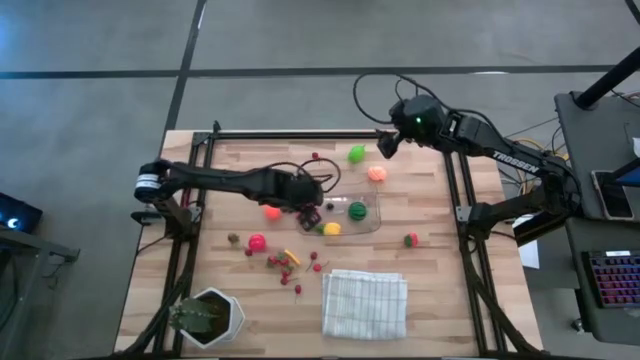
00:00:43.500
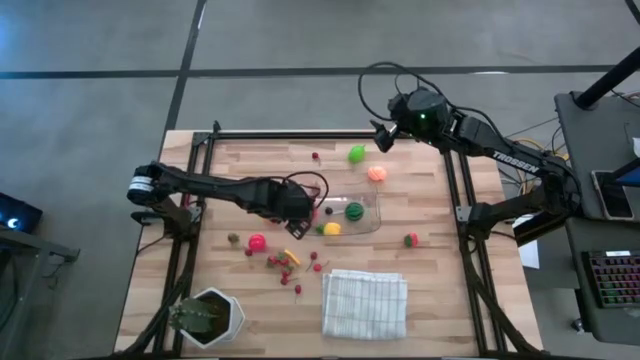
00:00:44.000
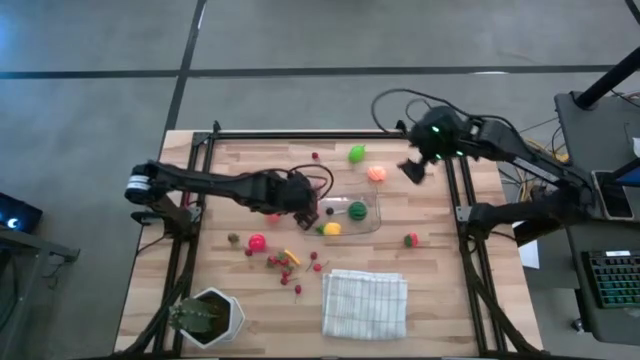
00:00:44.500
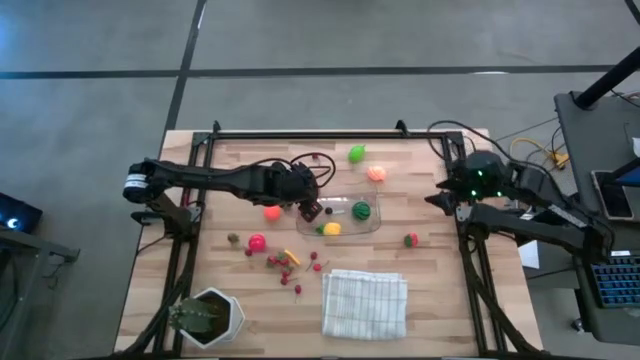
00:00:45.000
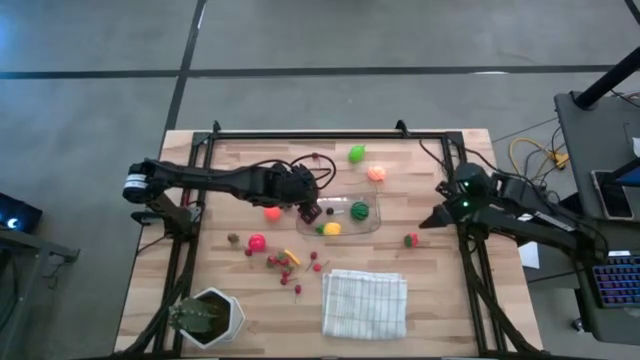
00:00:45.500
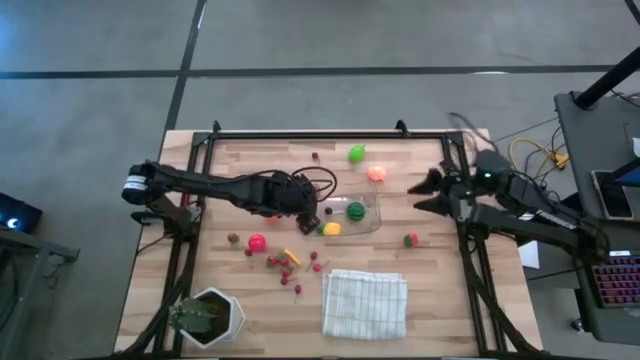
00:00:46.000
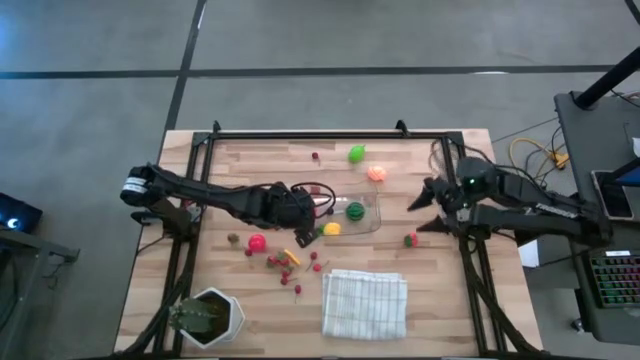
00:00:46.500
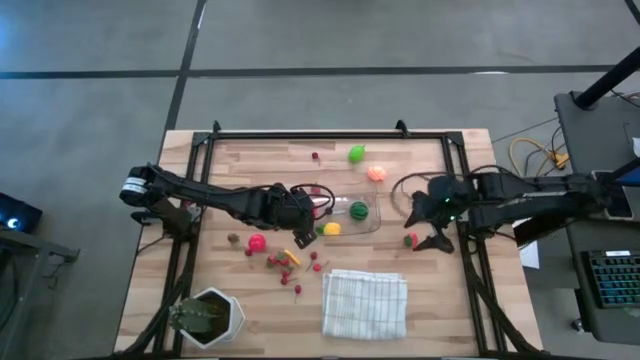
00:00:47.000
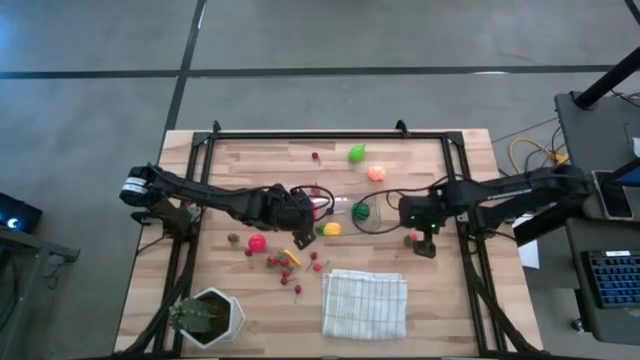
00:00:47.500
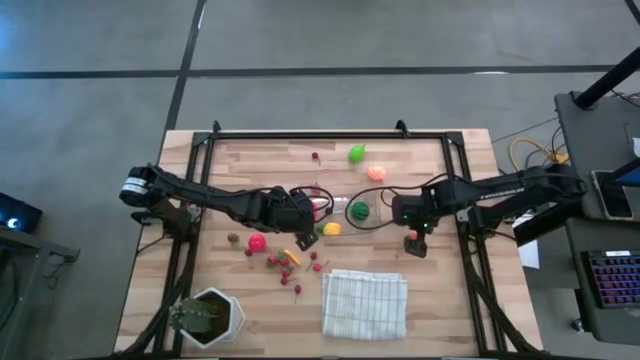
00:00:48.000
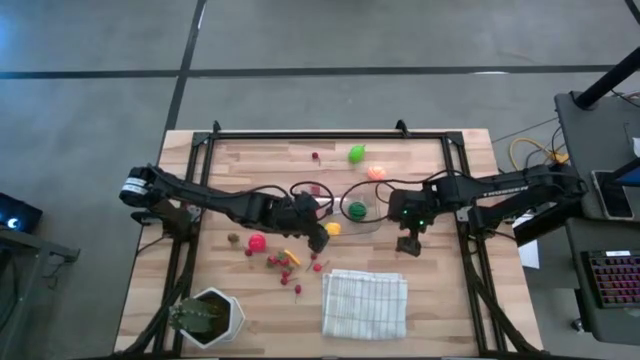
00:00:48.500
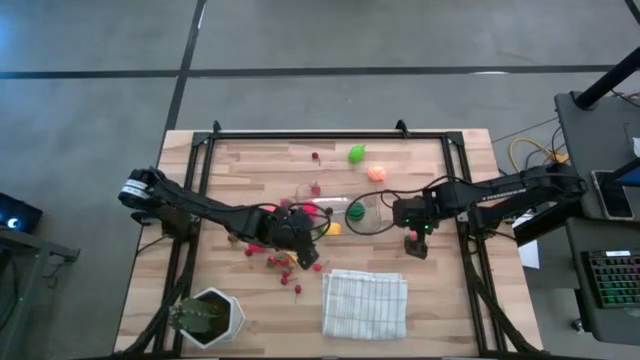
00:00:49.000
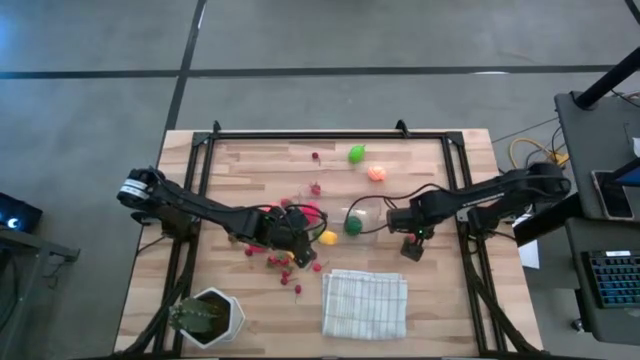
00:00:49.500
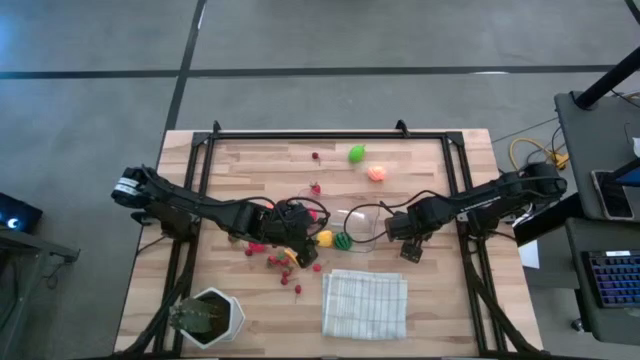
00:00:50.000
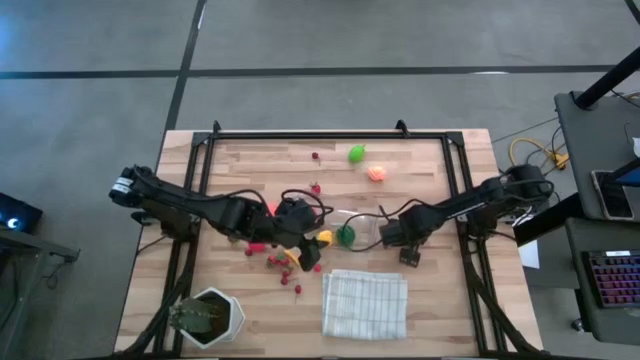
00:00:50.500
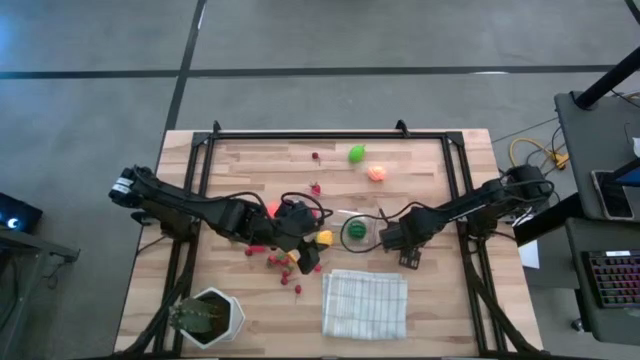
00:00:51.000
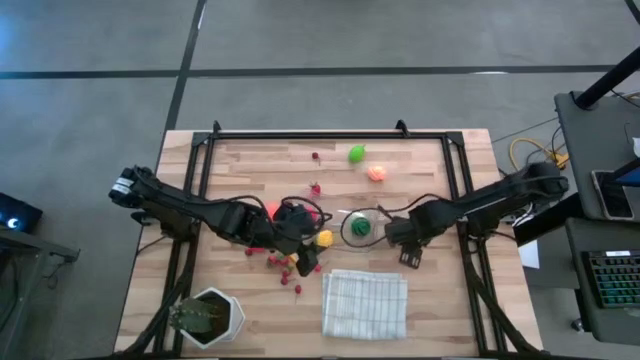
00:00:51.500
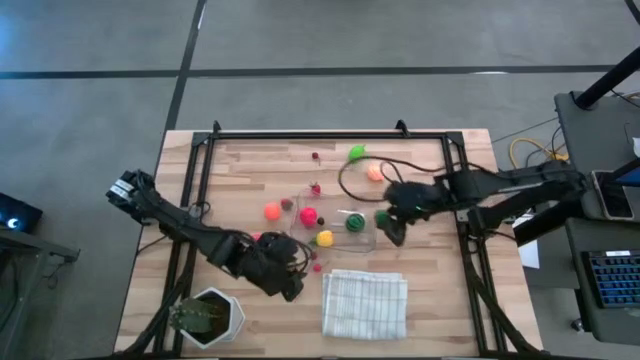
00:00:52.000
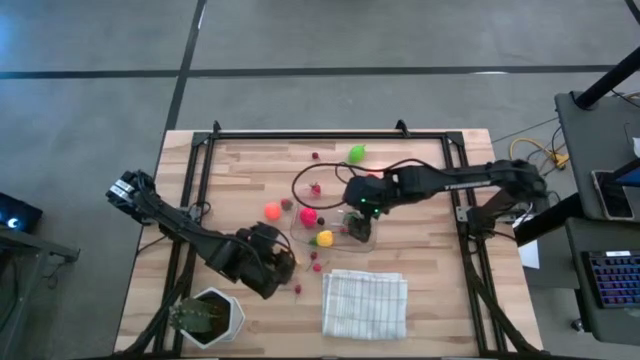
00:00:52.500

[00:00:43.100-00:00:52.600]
Task: Pick and placing Produce into tupperware
Put the red strawberry into the transparent bin

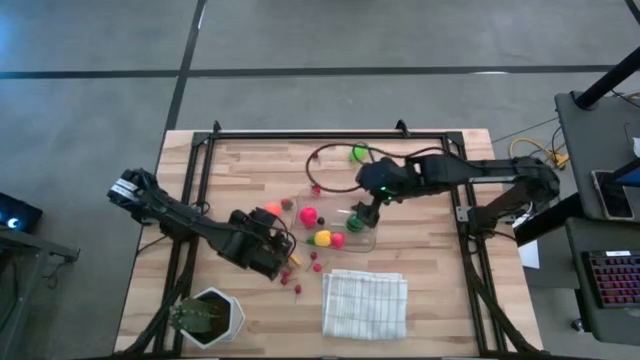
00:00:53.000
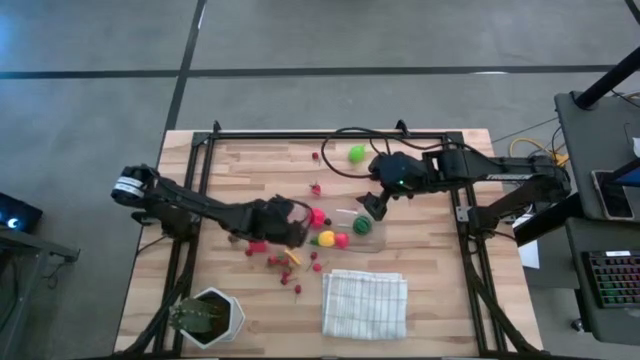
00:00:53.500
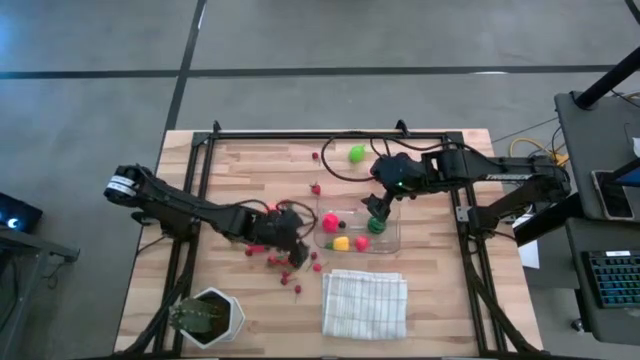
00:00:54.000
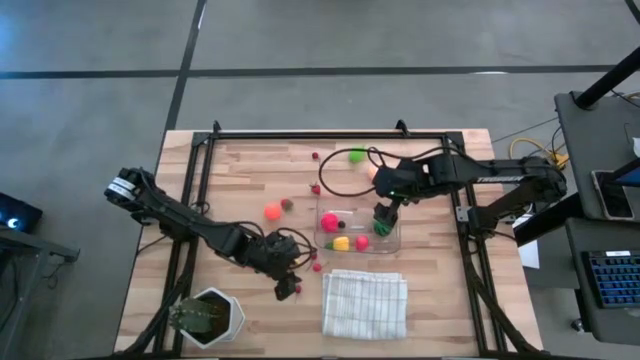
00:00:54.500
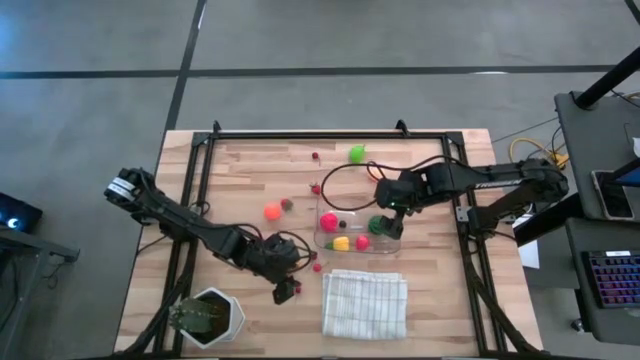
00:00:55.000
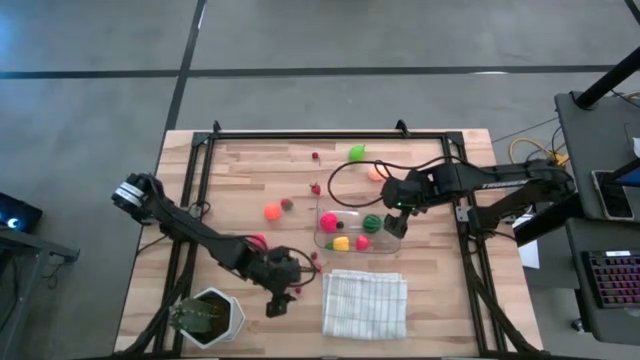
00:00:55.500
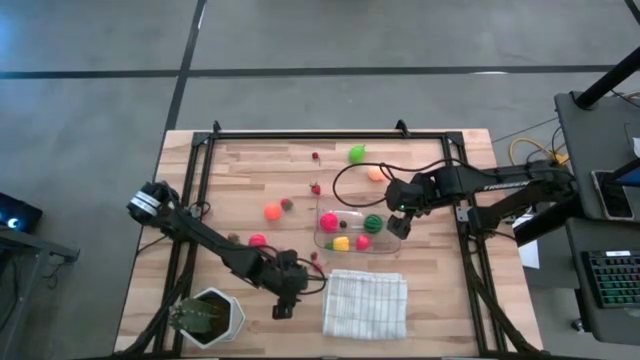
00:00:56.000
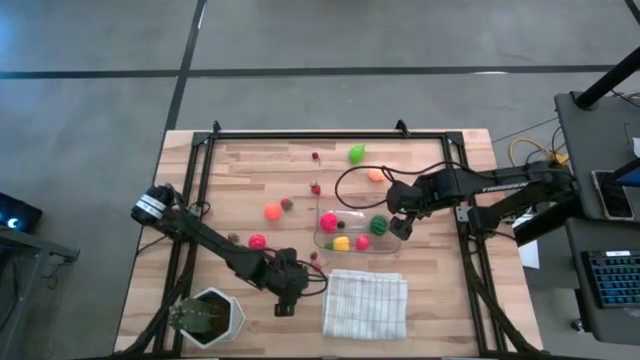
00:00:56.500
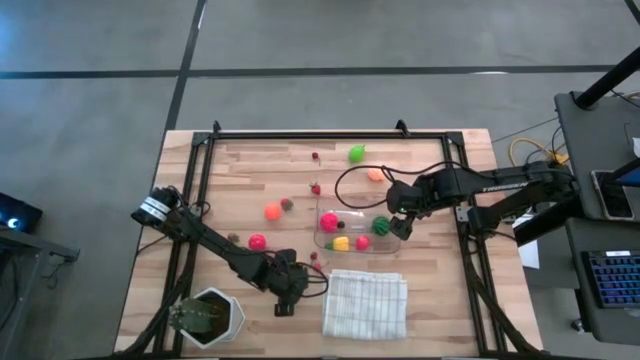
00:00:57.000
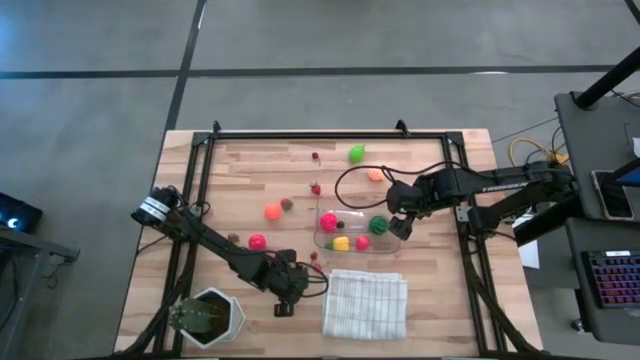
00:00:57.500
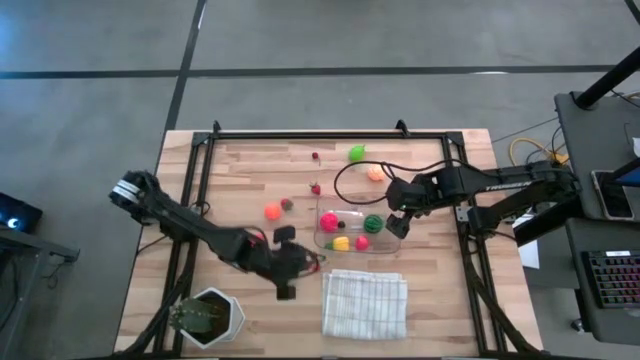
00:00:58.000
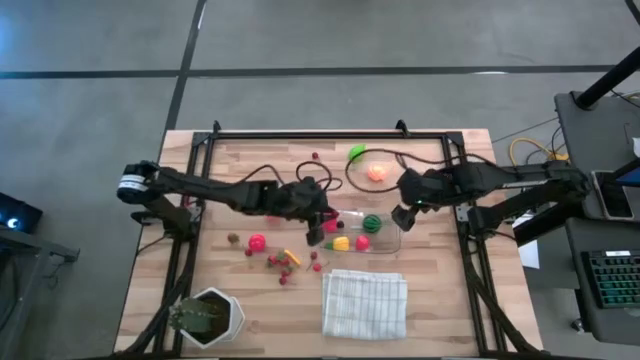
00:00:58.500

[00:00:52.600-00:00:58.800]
Put the red cherry into the transparent bin

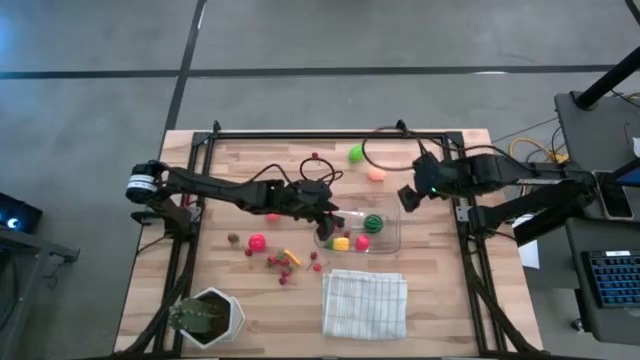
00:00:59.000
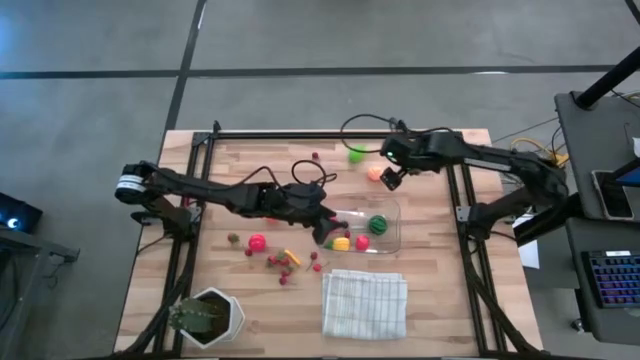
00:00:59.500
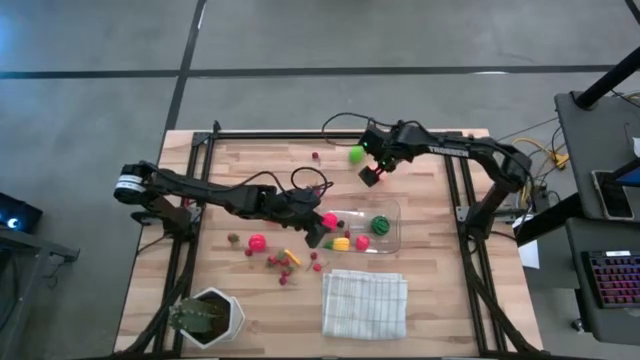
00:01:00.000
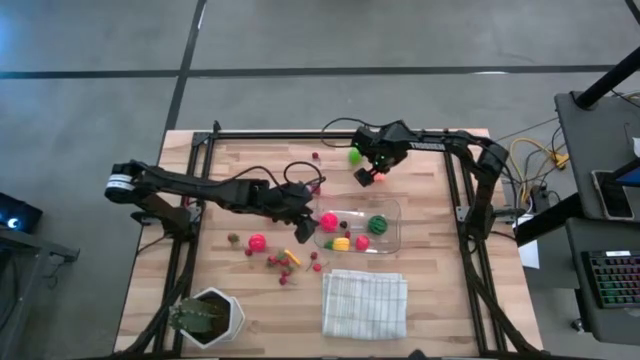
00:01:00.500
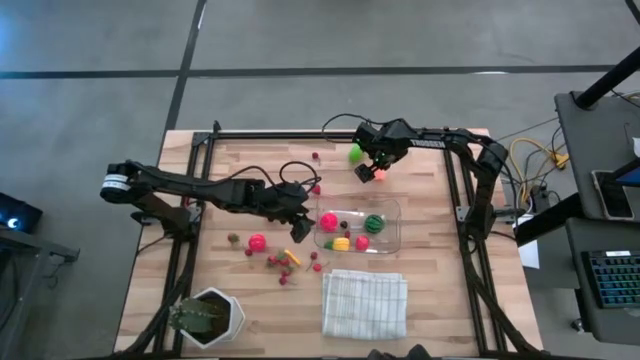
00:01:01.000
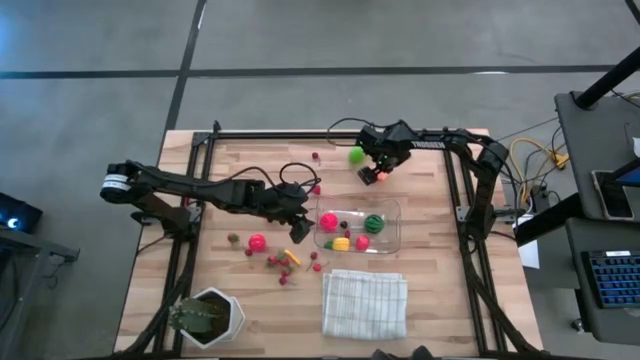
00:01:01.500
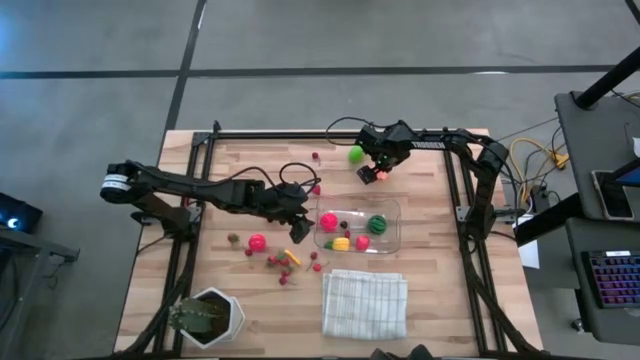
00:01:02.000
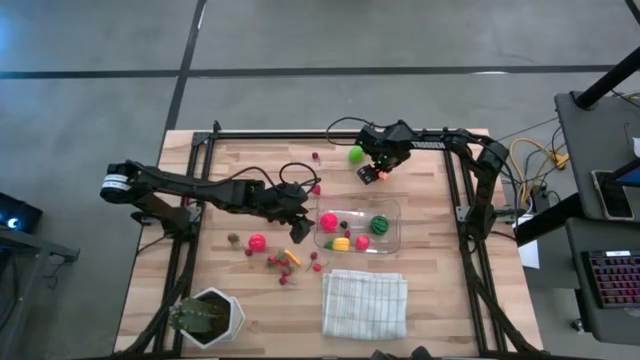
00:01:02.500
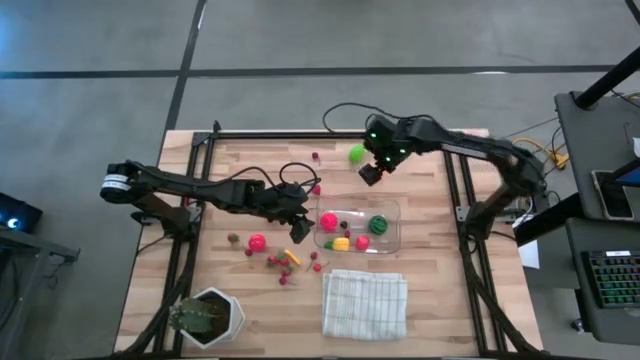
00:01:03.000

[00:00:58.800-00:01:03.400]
Put the pink peach into the transparent bin

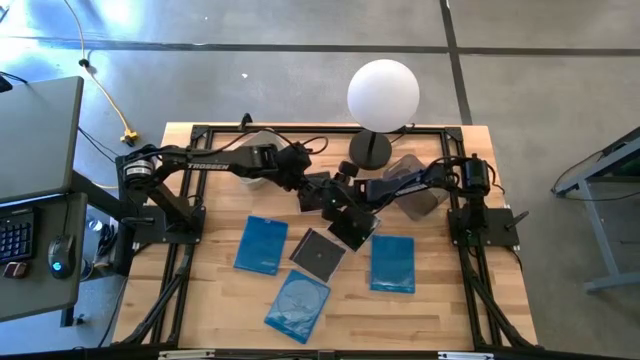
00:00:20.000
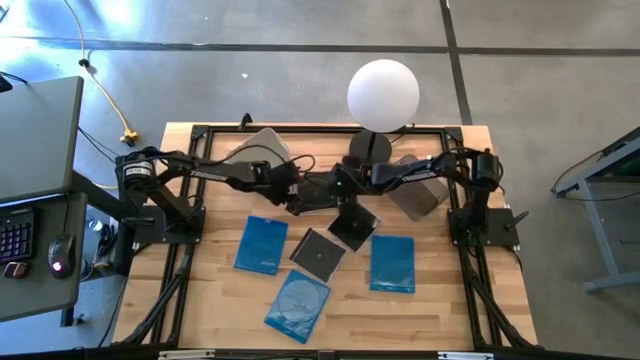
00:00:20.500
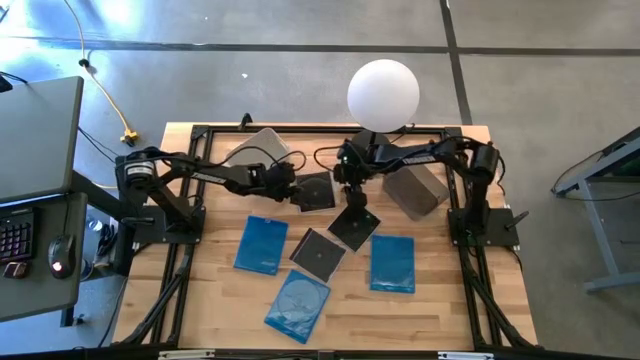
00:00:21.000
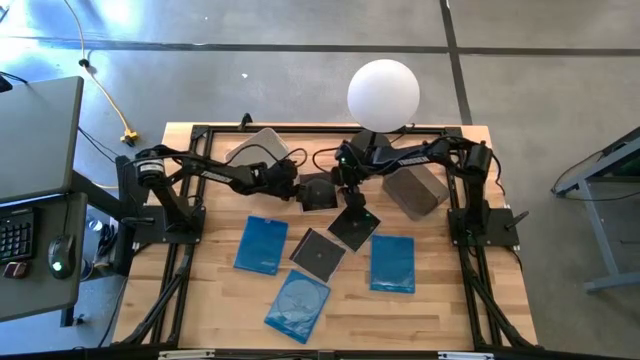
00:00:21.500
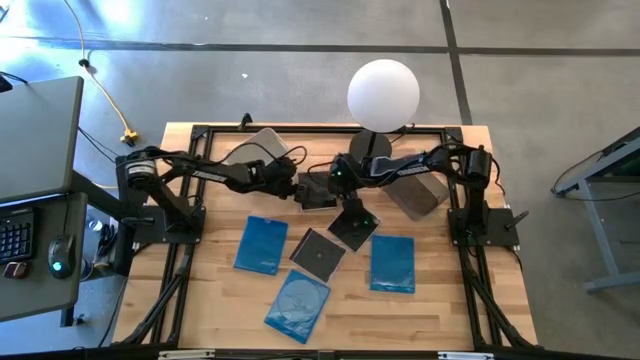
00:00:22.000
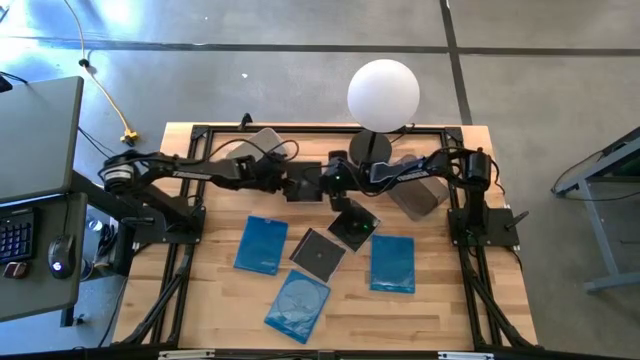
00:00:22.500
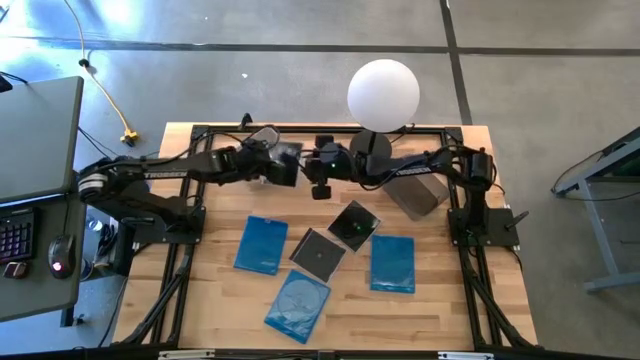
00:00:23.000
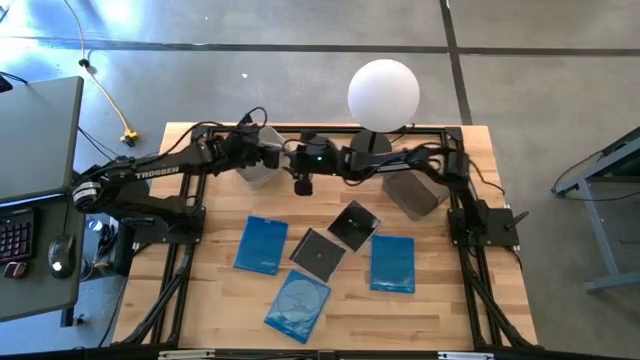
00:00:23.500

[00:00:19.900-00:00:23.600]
Task: Pick & place jewel cases by type
Put the top black CD case into the white bin
